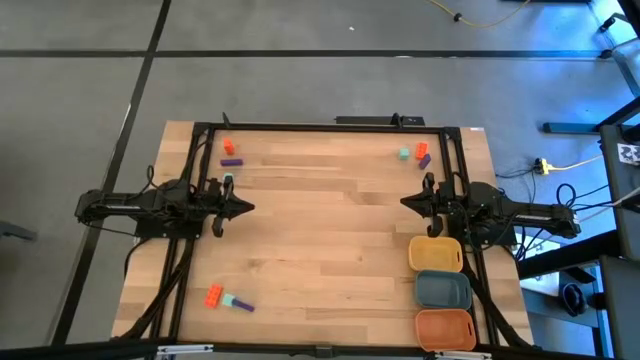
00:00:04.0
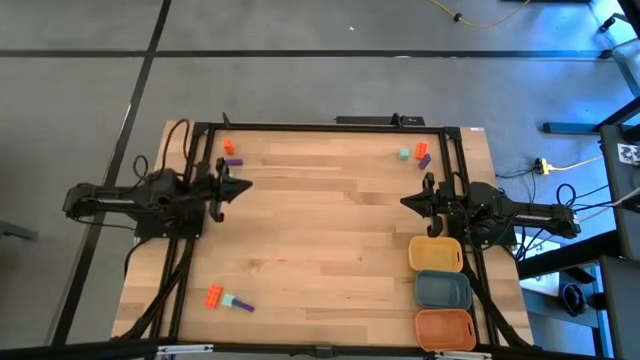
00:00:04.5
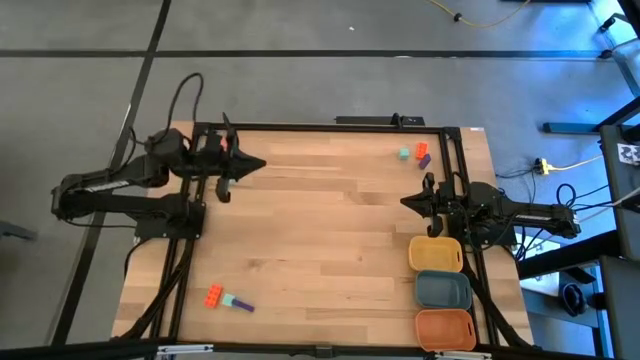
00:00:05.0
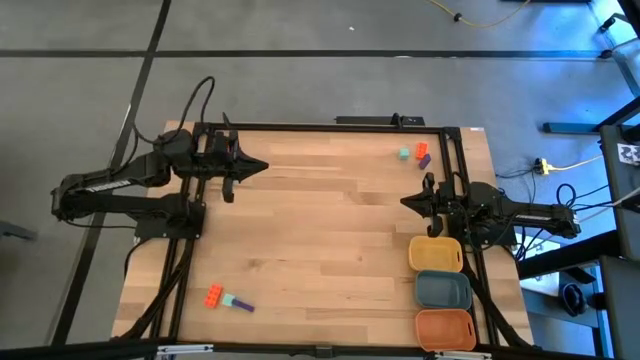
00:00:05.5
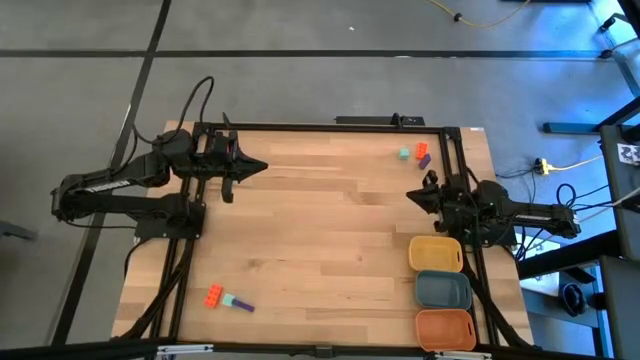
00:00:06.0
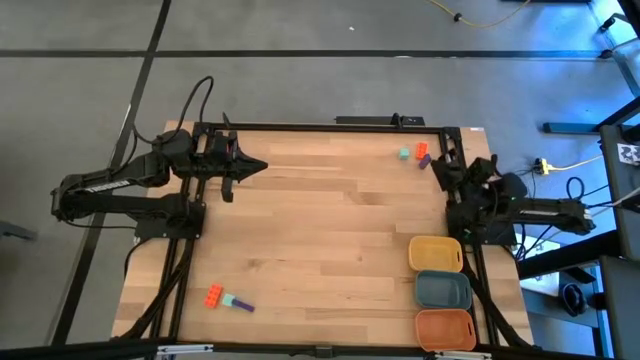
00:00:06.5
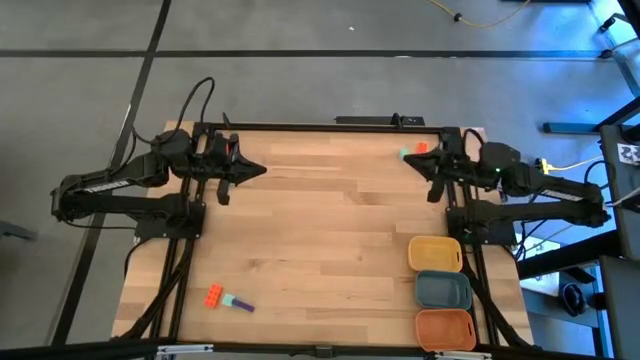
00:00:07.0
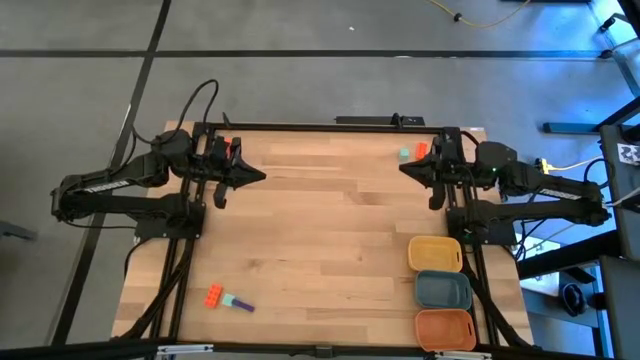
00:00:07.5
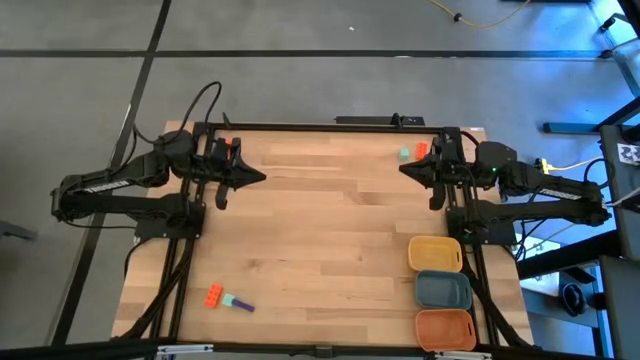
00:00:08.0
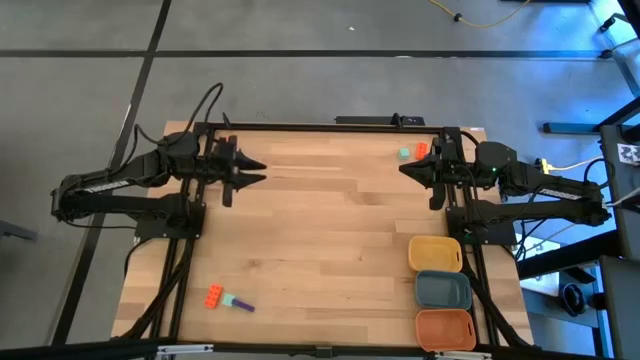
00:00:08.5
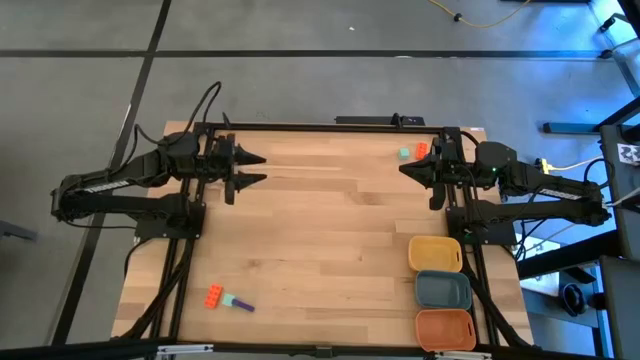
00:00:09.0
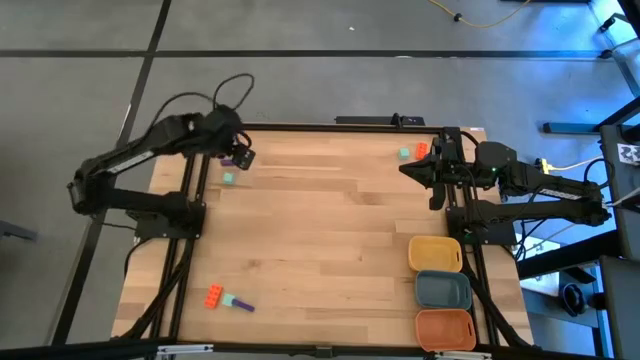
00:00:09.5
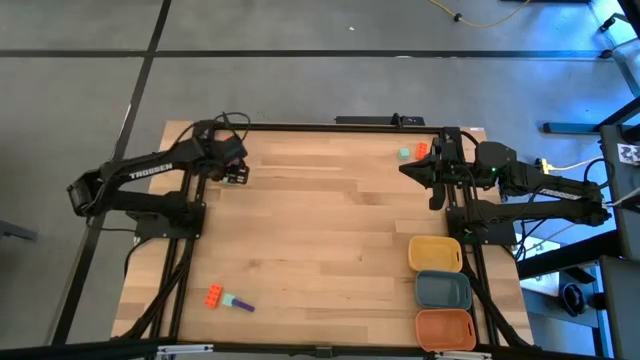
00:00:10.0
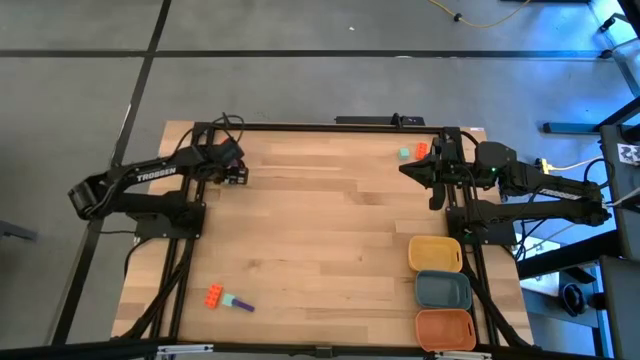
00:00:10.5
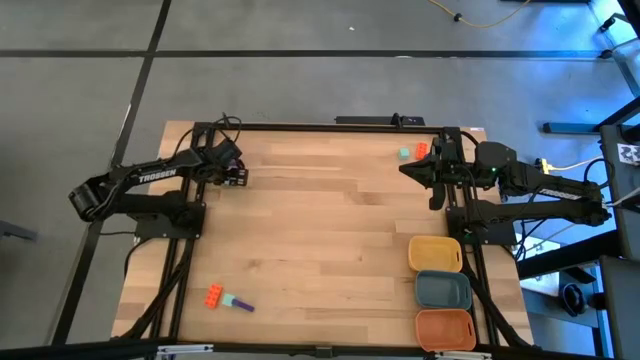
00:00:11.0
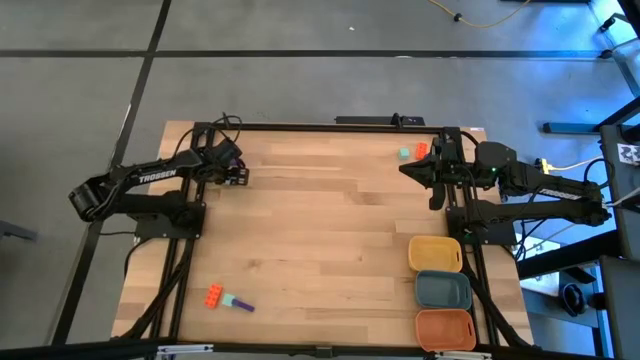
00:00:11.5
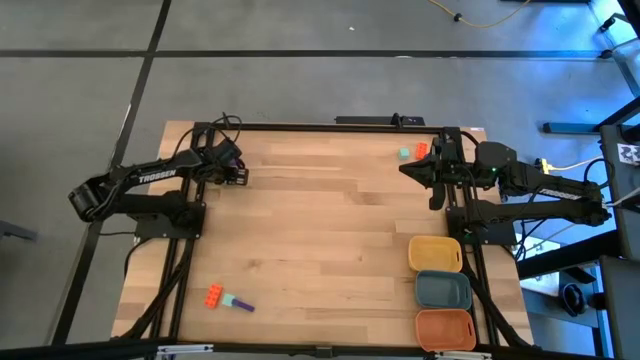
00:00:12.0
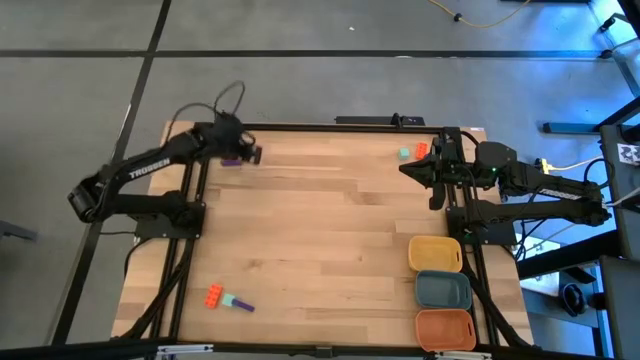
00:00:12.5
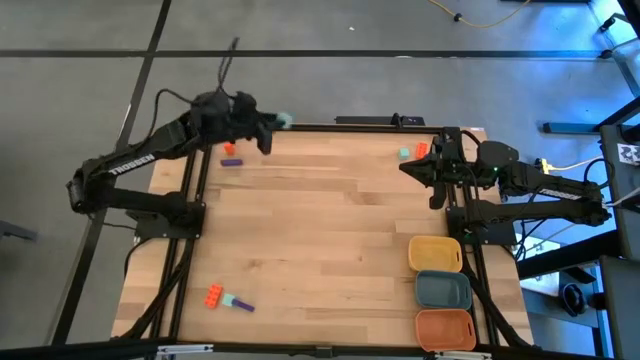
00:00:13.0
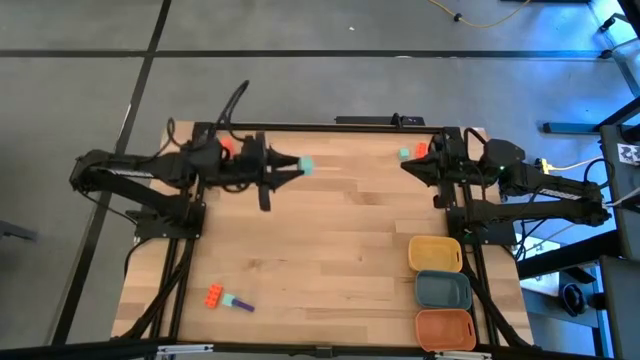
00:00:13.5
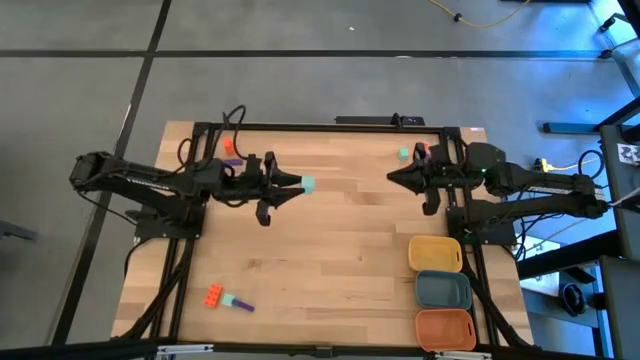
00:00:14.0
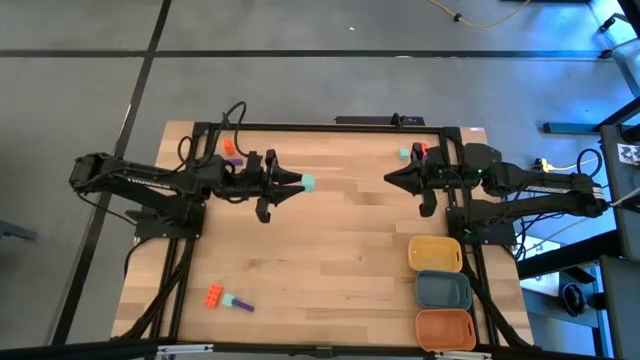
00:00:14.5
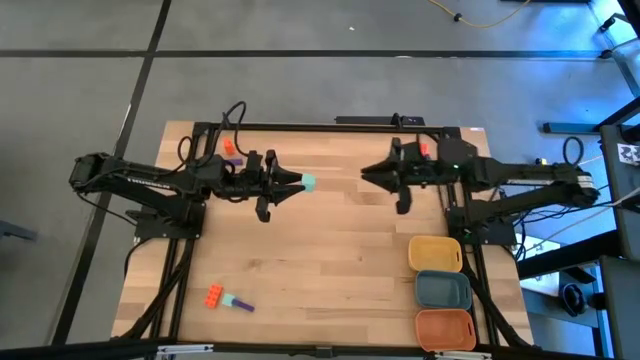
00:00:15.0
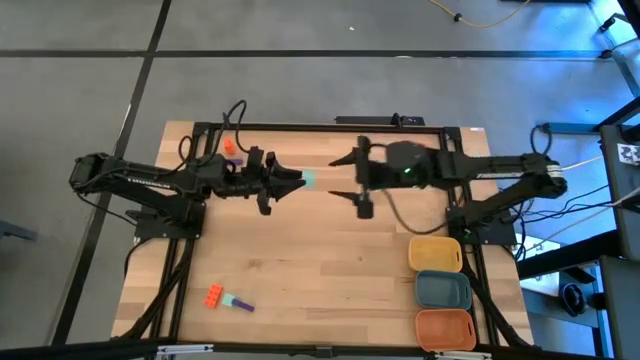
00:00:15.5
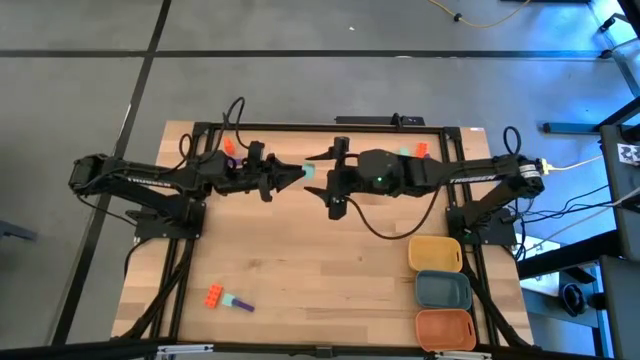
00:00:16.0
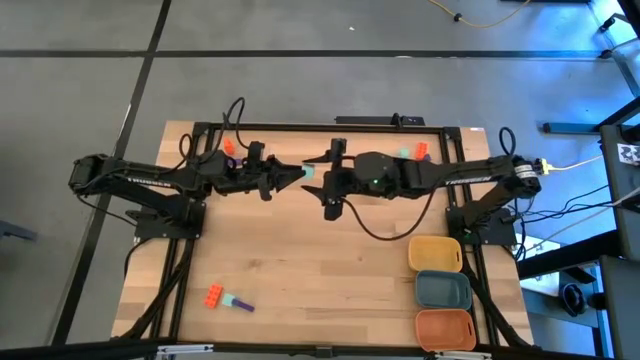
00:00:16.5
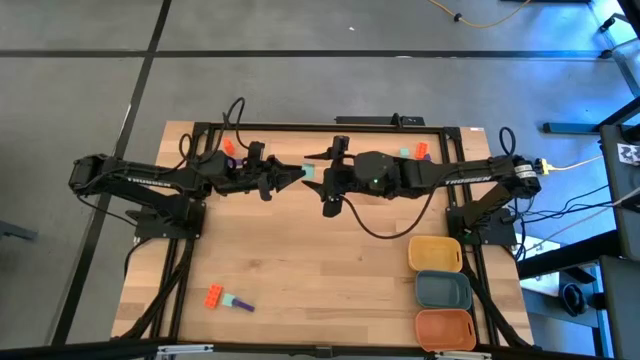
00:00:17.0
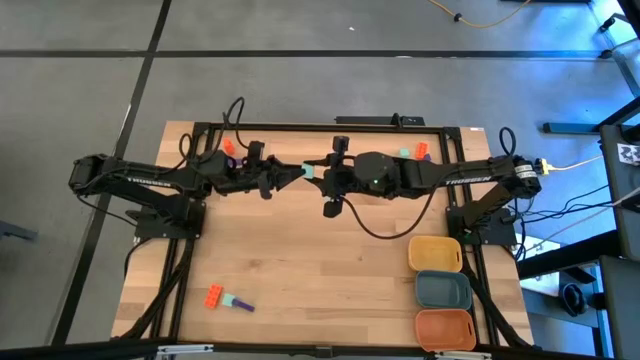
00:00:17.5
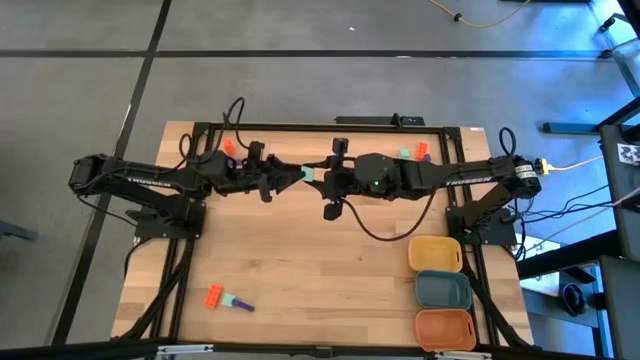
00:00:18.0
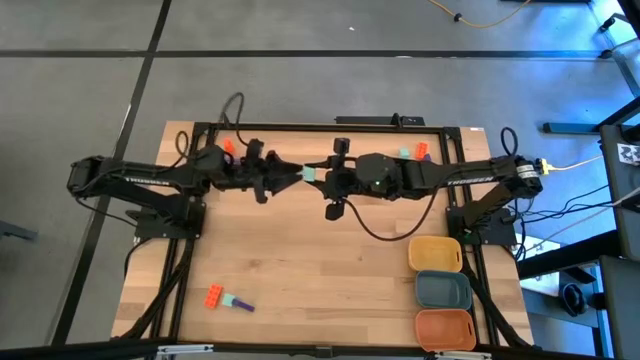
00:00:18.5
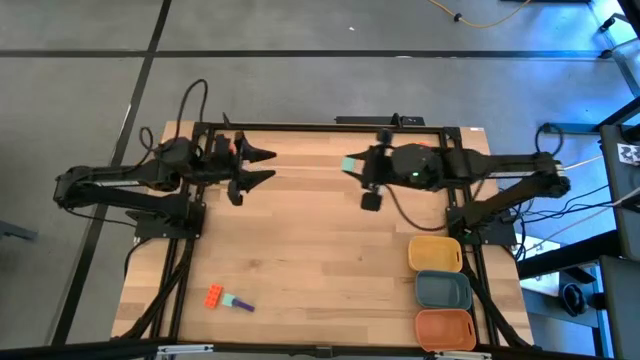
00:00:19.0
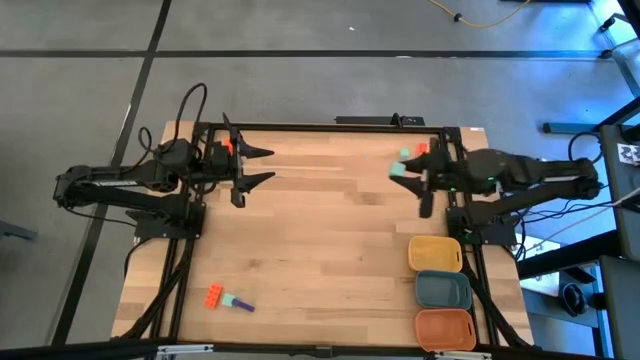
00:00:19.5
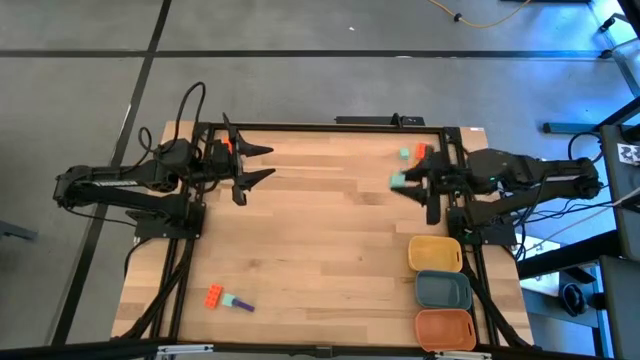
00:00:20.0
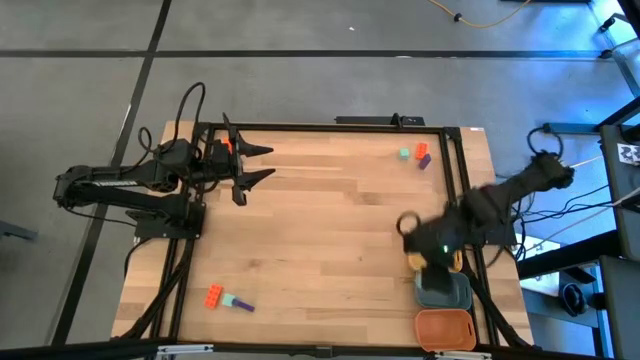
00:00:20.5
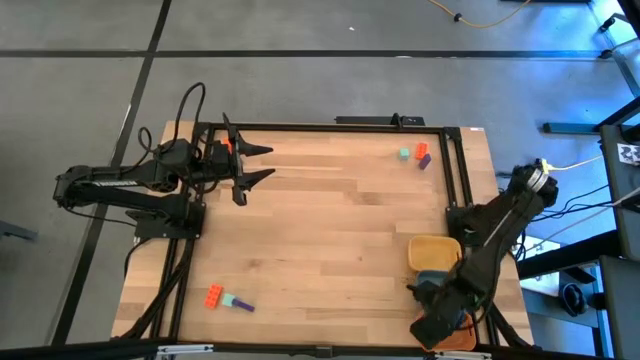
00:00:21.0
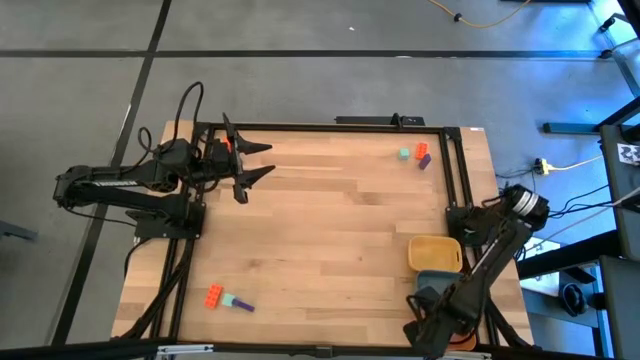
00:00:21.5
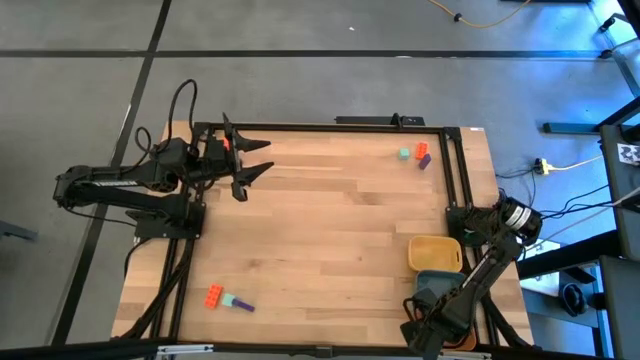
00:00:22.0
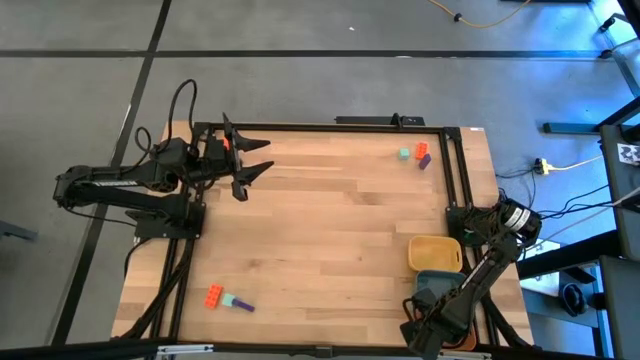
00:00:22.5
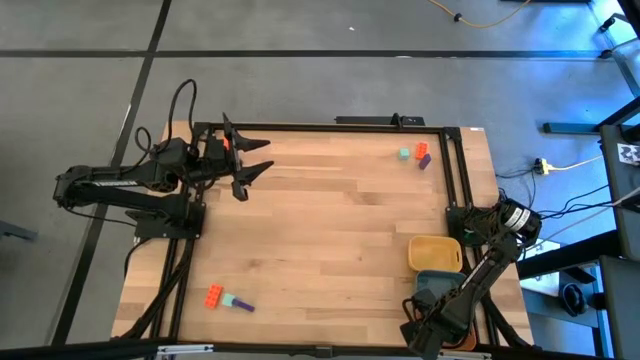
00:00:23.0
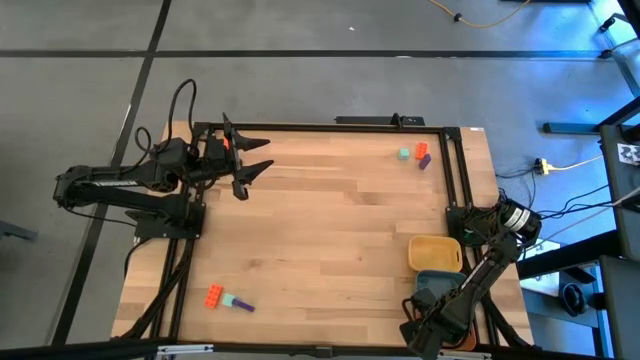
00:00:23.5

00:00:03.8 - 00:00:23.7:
Task: Sort & place blocks by color
Put the top left light blue block into the orange bin
